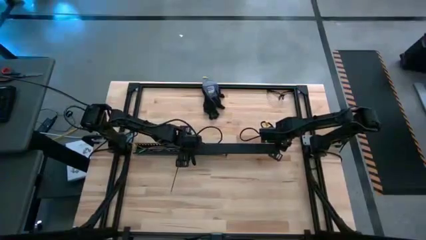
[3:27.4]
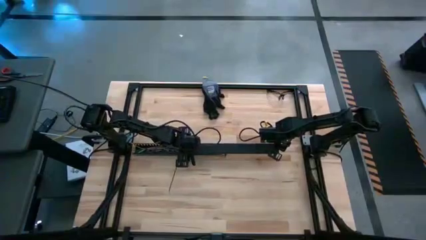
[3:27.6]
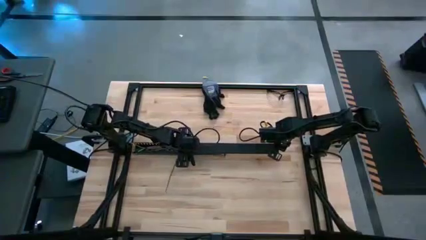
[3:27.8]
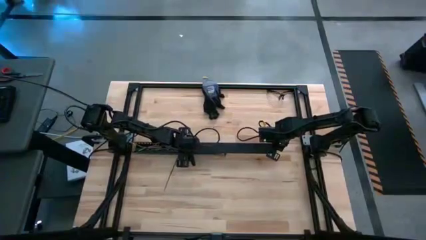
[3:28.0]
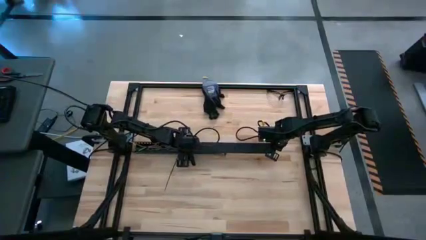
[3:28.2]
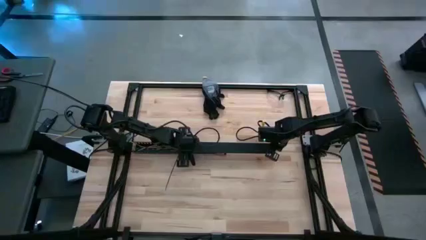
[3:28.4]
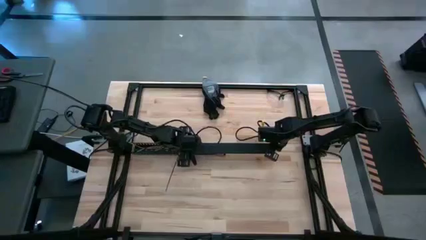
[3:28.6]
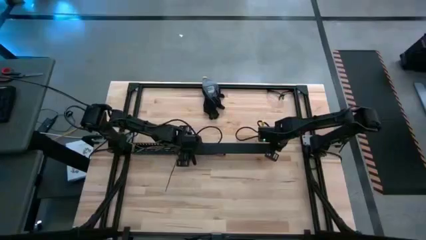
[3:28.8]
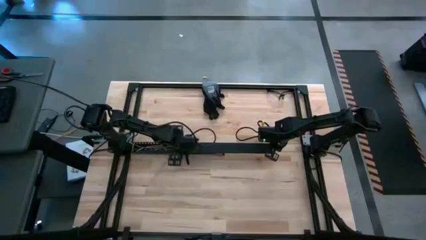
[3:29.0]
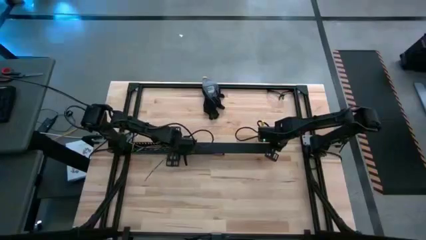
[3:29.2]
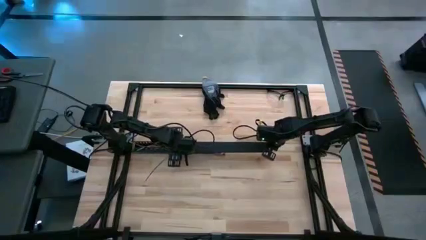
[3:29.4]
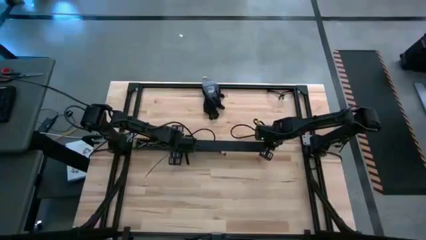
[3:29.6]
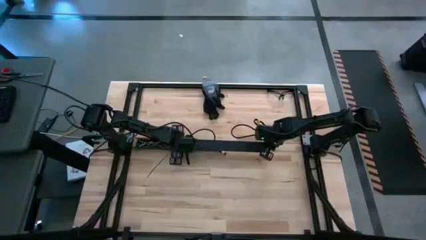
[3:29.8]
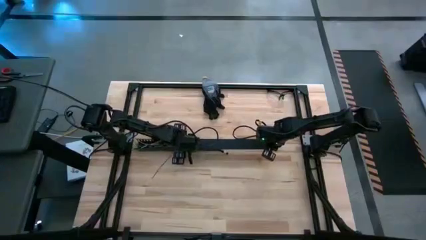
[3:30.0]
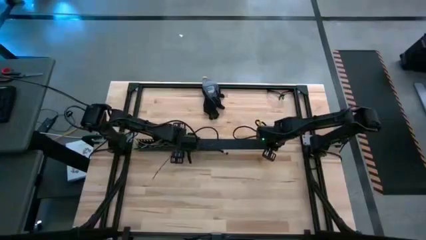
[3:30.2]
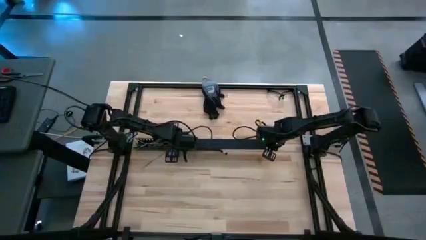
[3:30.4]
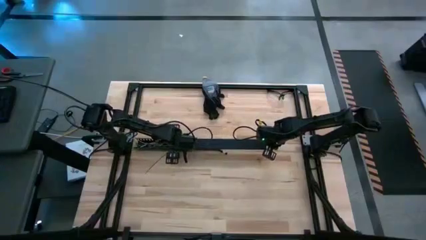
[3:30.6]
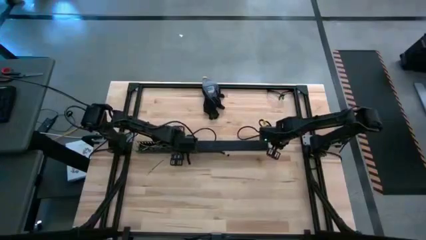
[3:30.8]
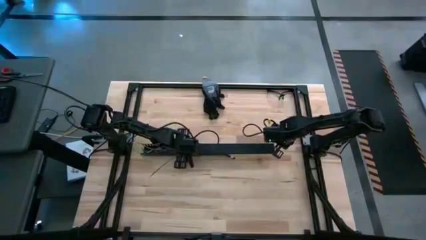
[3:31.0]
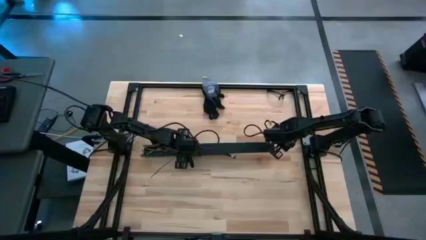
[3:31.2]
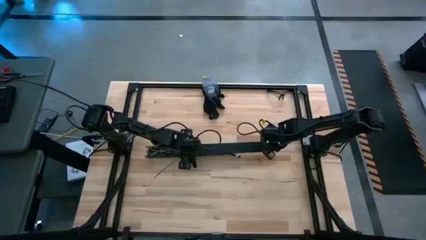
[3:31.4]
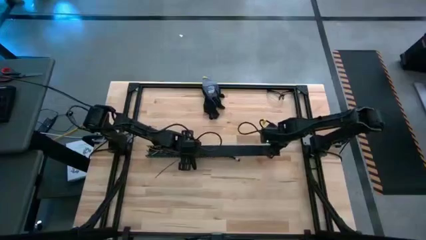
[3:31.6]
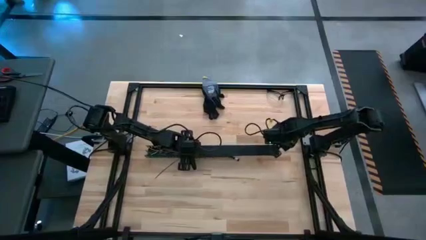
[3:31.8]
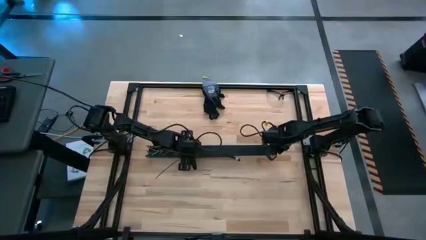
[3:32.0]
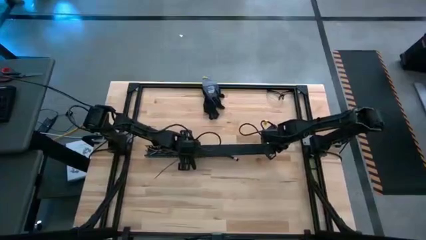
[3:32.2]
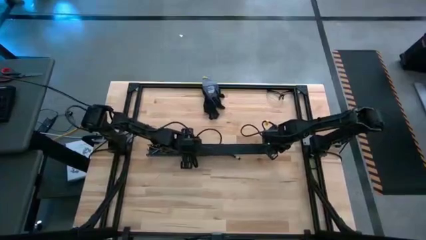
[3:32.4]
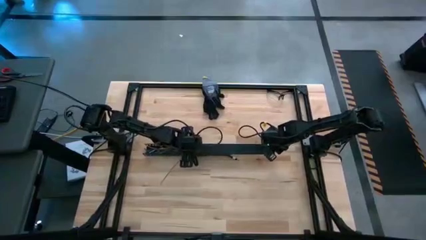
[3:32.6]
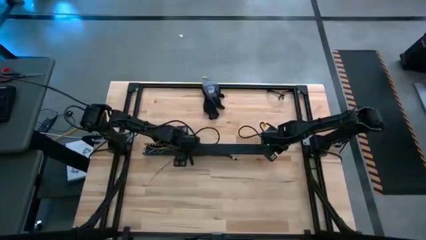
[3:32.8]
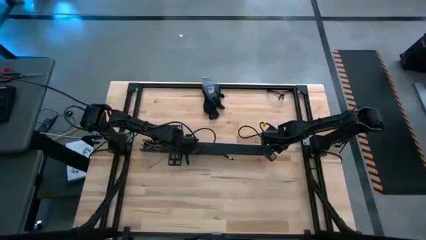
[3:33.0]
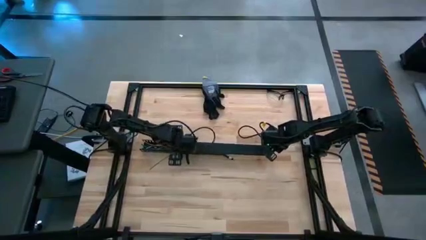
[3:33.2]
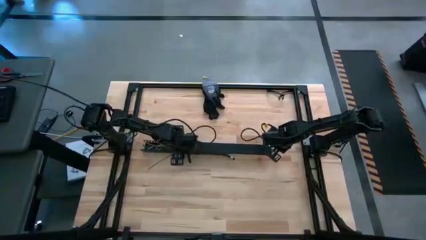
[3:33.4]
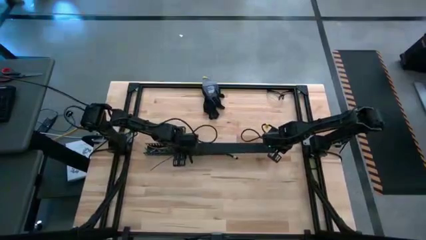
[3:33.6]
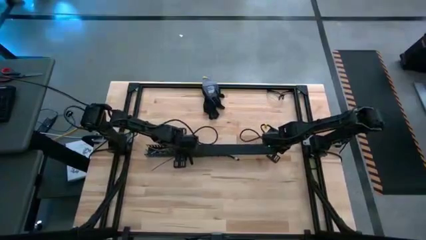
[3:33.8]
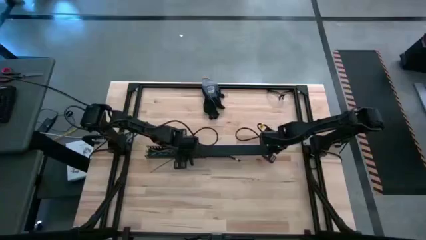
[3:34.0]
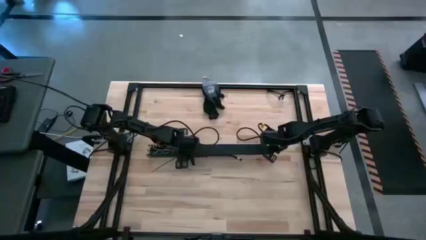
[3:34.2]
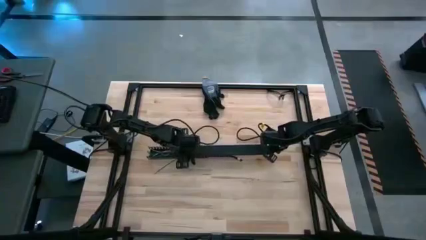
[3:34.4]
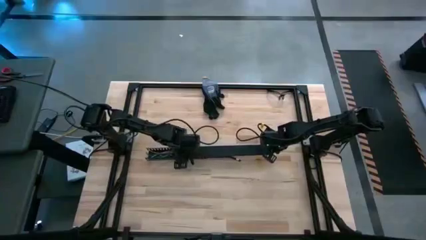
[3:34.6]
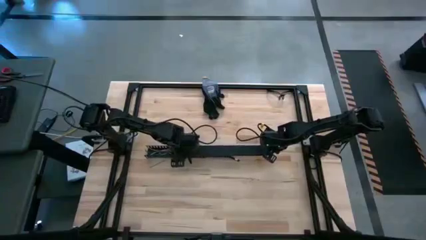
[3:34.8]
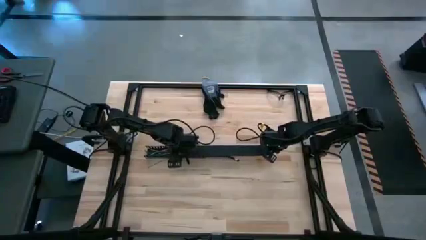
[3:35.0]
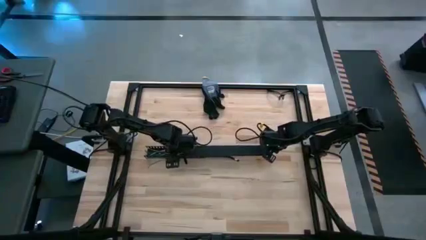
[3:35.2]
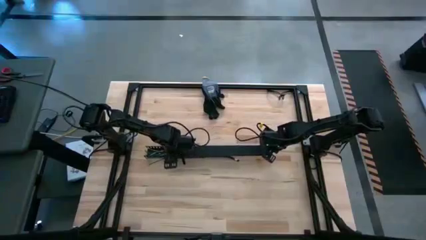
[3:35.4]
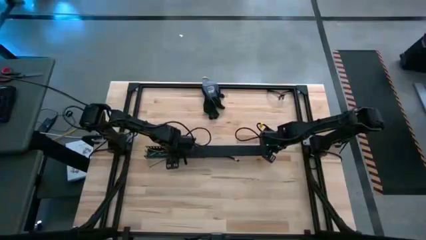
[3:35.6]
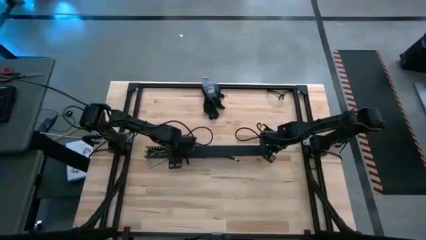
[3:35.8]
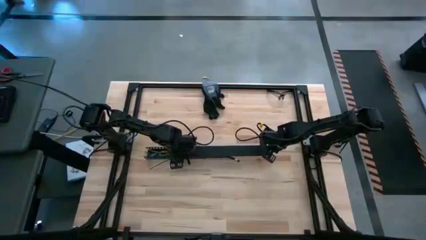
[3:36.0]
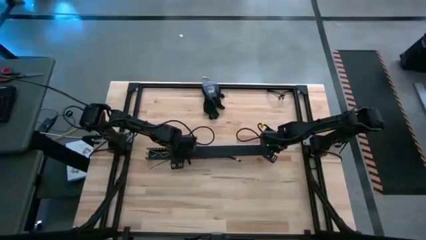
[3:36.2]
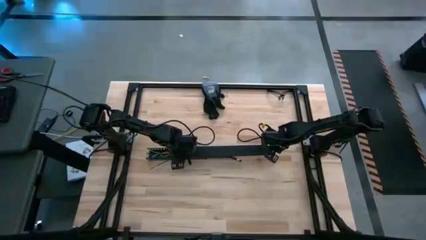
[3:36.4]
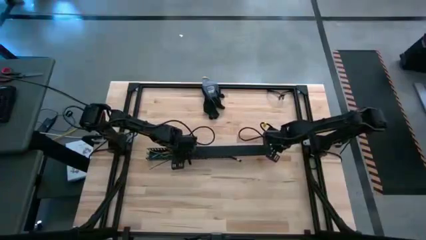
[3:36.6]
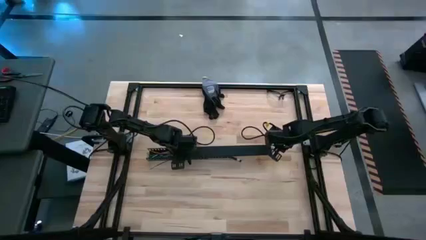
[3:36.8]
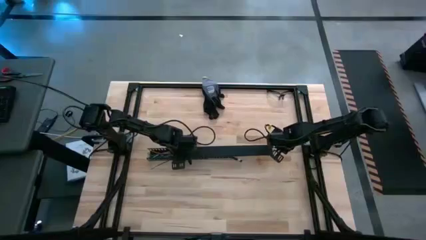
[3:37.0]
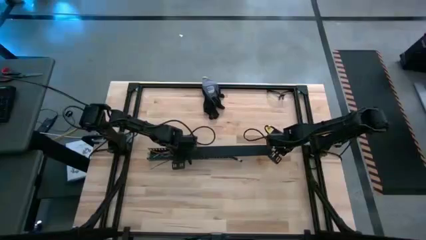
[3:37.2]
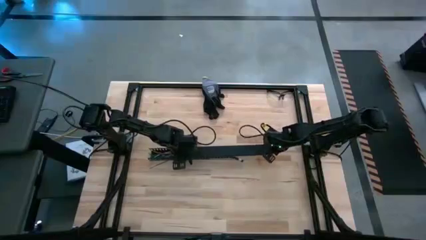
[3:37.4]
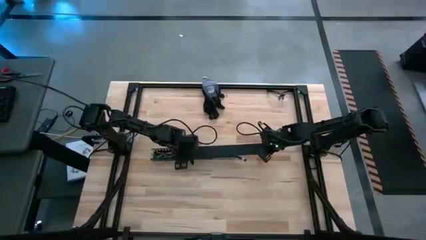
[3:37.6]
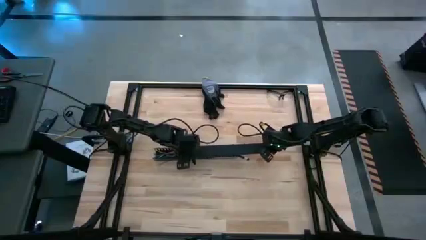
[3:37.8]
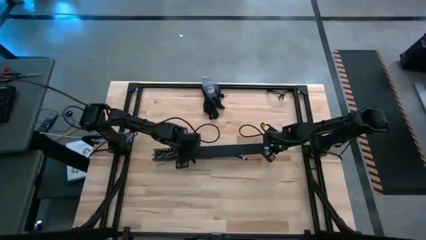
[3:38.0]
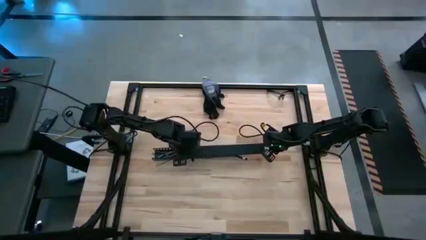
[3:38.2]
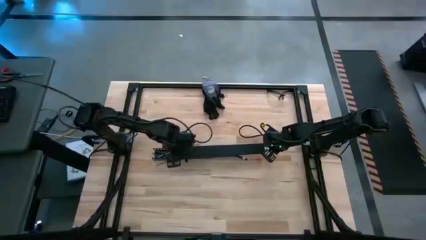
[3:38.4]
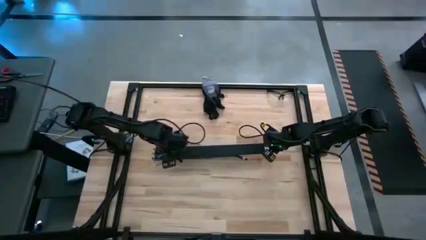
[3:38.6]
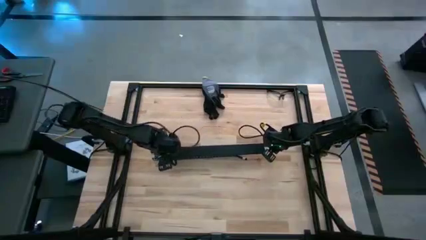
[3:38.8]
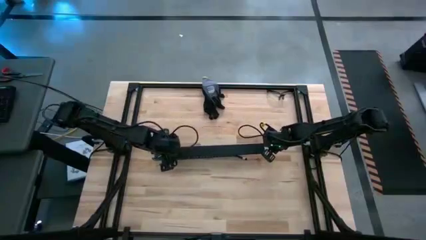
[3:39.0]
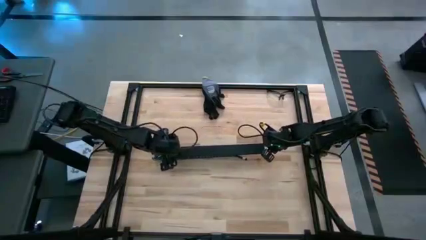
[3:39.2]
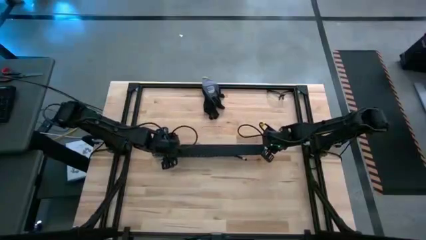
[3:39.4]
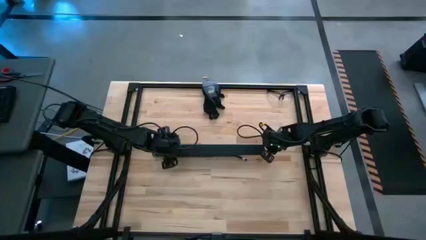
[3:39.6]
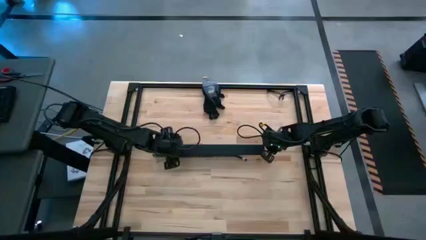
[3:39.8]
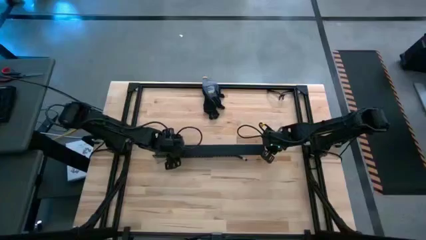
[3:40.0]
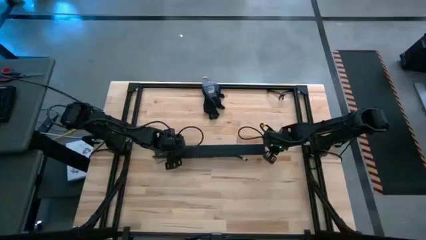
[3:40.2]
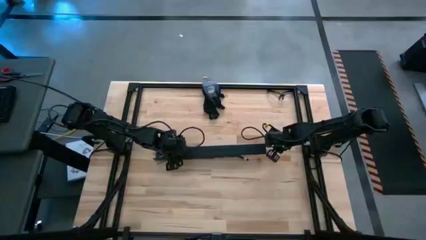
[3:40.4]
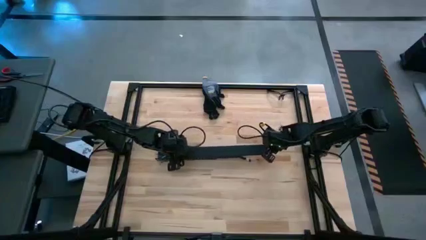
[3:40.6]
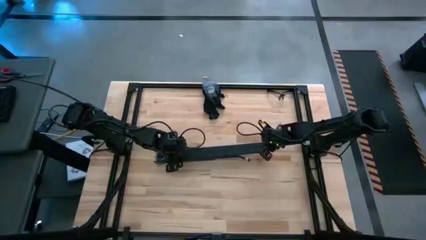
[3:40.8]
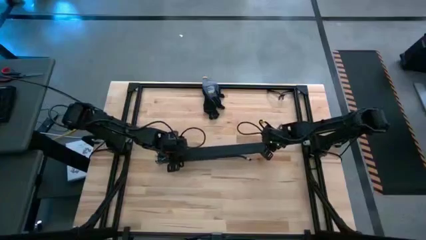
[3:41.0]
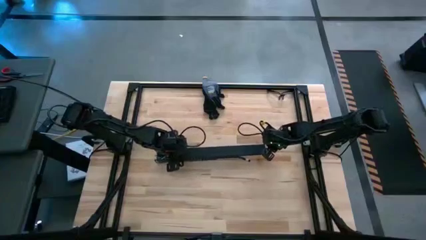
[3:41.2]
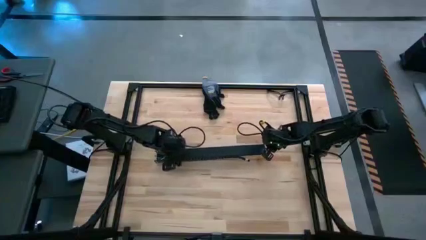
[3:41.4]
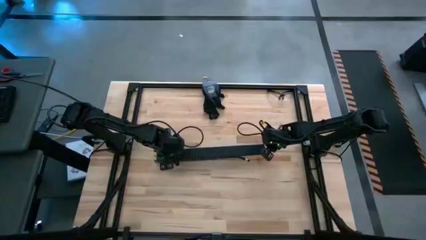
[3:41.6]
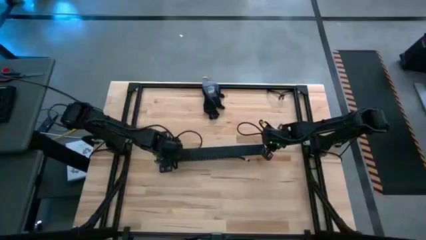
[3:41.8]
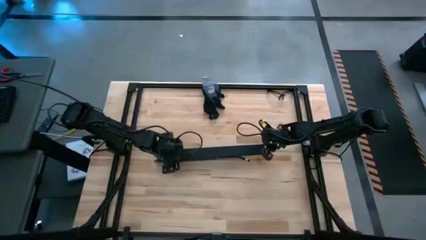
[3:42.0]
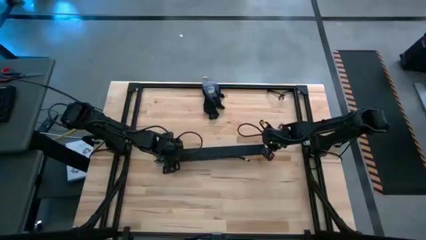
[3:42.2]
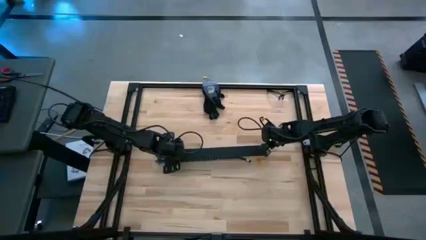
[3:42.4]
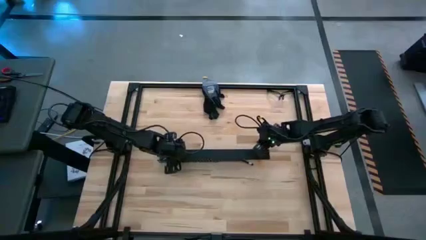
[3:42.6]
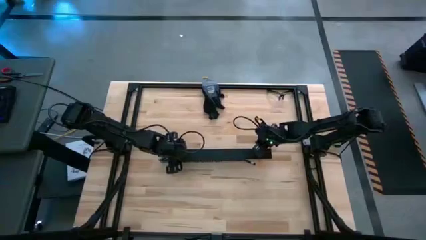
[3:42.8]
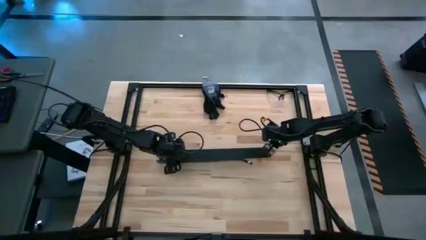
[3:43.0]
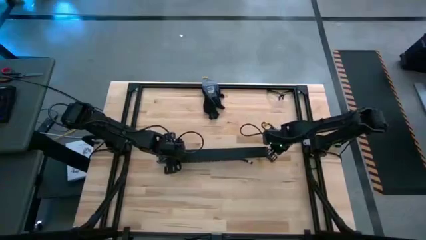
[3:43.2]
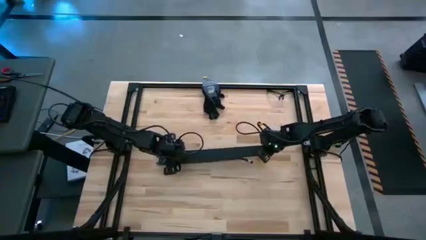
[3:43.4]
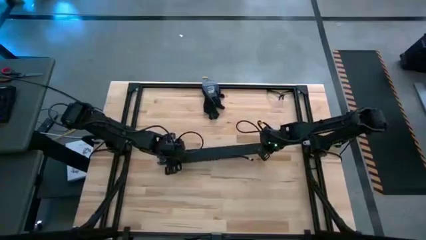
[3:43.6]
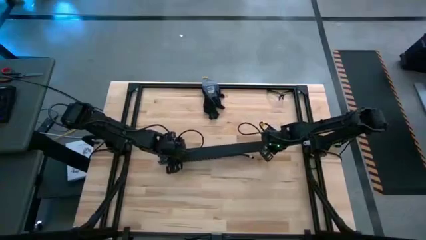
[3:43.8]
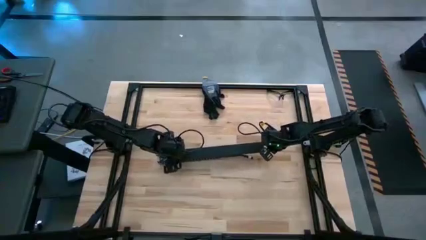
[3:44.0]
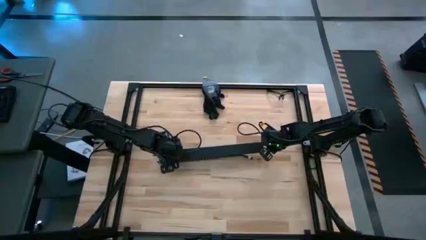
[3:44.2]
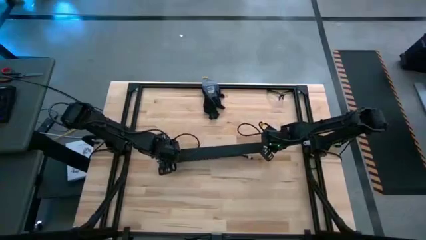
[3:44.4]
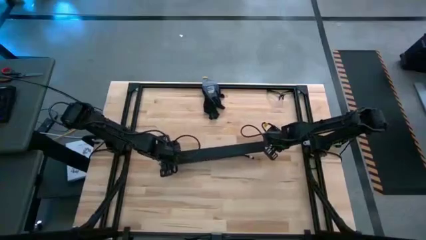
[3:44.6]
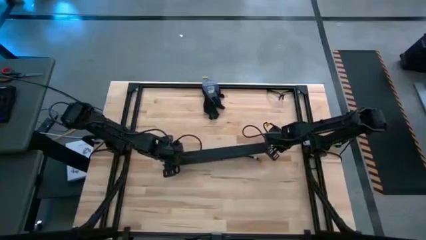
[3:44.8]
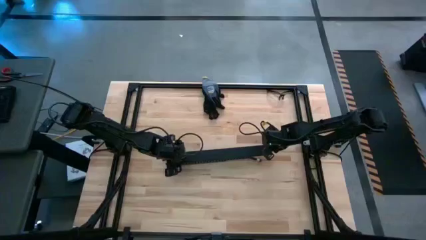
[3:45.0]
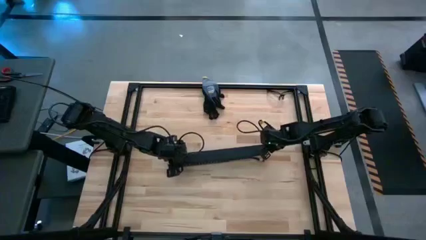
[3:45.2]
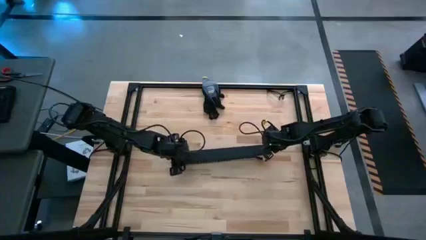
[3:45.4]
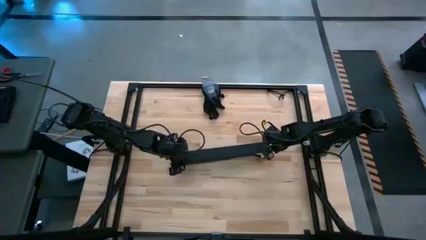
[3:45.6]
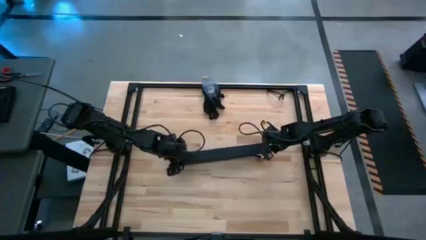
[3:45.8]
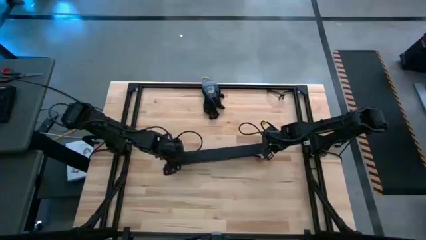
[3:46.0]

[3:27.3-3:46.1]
Task: Ziptie cables
Close the black cable duct
